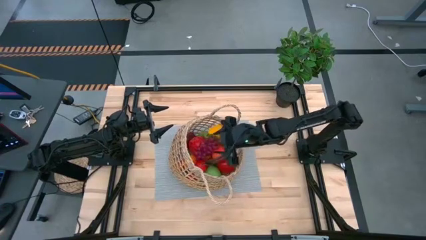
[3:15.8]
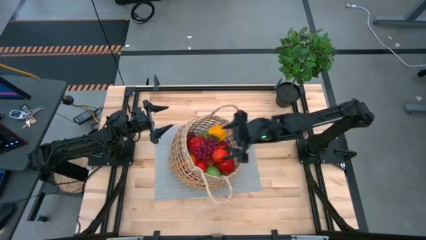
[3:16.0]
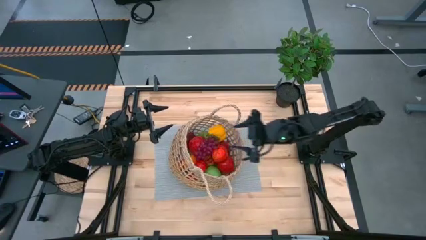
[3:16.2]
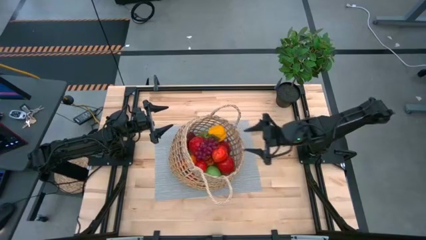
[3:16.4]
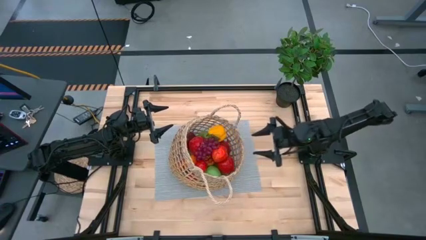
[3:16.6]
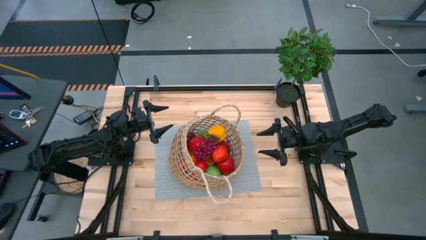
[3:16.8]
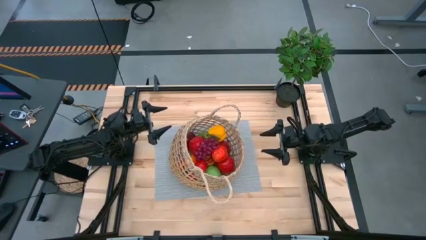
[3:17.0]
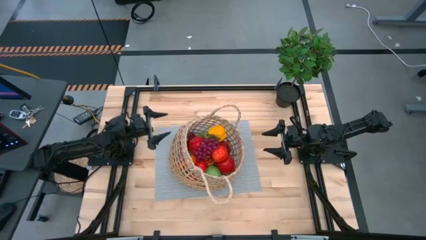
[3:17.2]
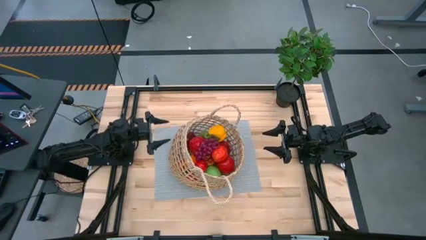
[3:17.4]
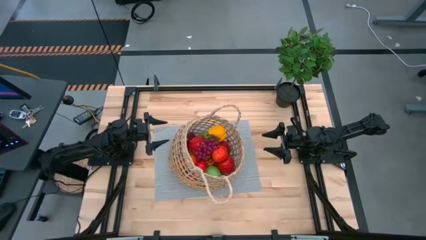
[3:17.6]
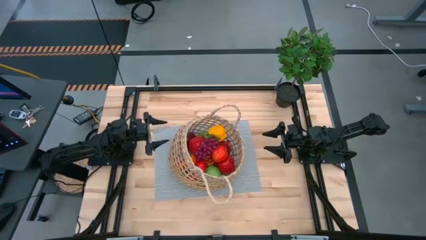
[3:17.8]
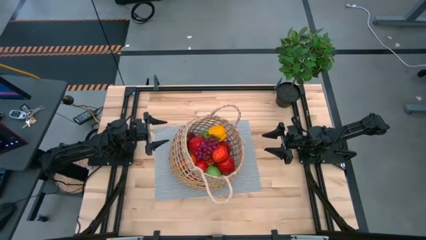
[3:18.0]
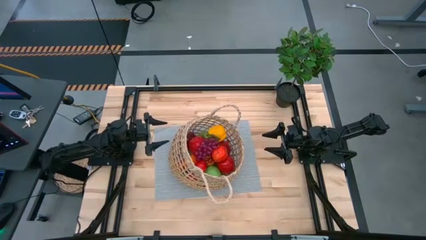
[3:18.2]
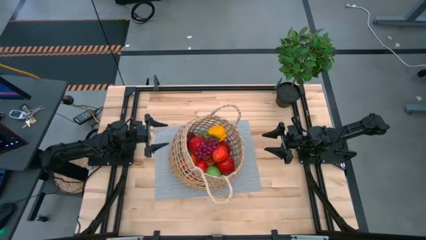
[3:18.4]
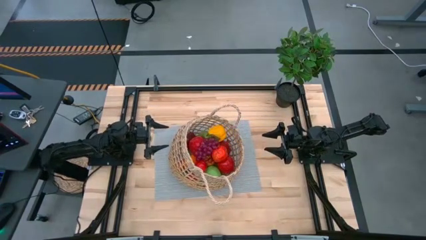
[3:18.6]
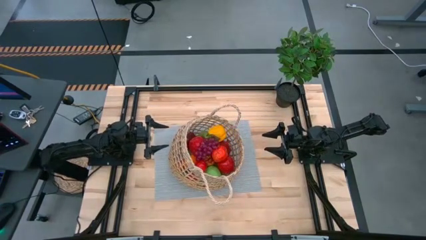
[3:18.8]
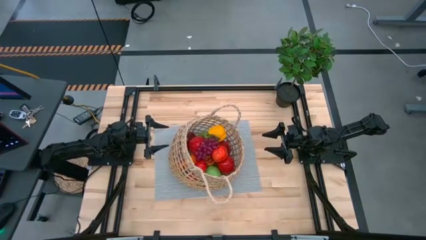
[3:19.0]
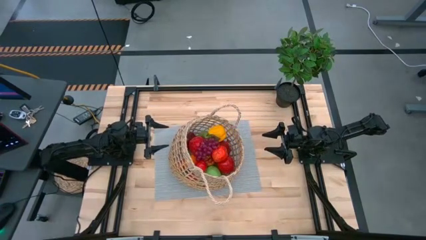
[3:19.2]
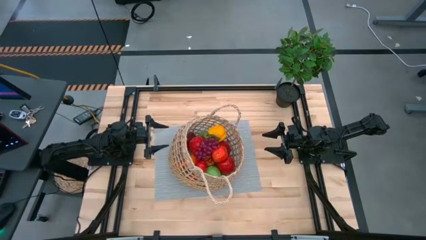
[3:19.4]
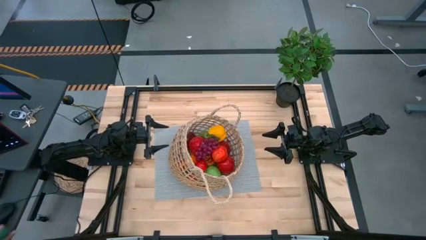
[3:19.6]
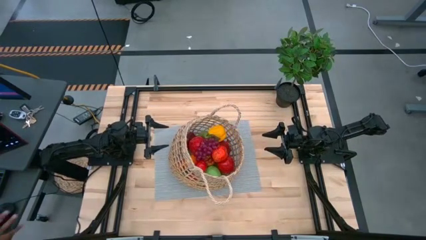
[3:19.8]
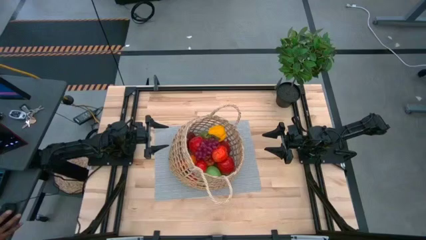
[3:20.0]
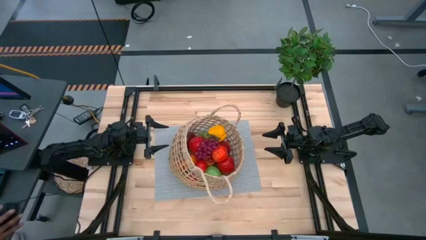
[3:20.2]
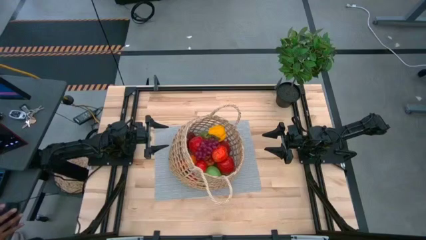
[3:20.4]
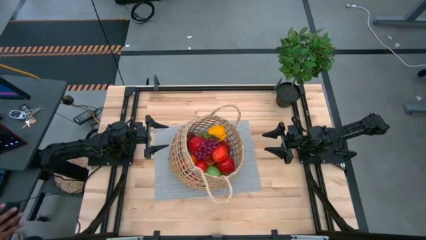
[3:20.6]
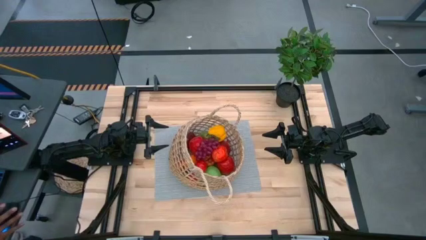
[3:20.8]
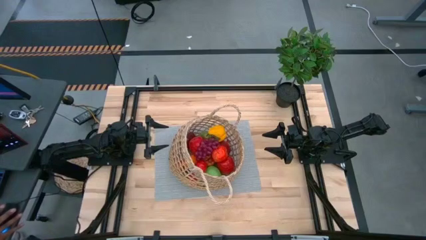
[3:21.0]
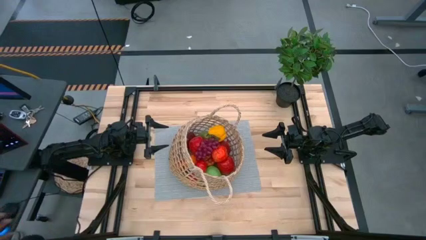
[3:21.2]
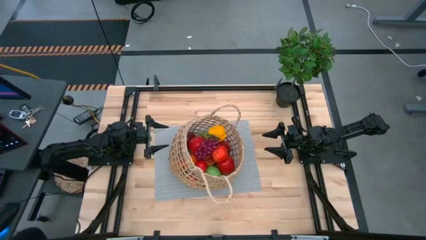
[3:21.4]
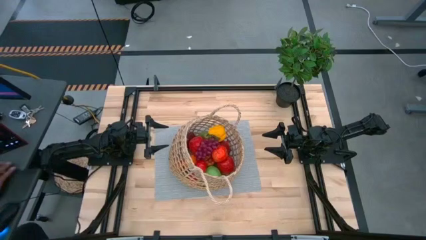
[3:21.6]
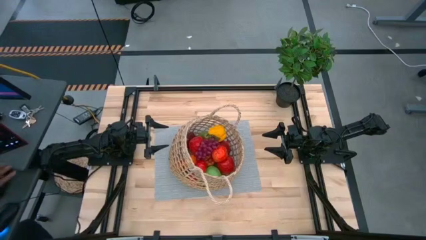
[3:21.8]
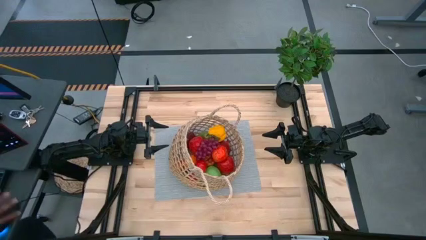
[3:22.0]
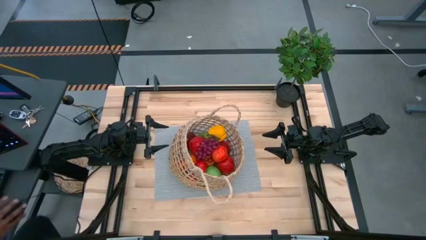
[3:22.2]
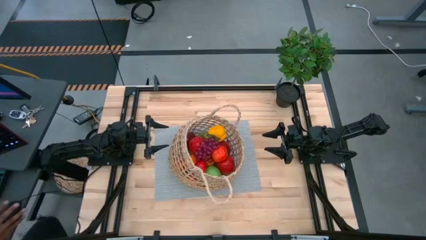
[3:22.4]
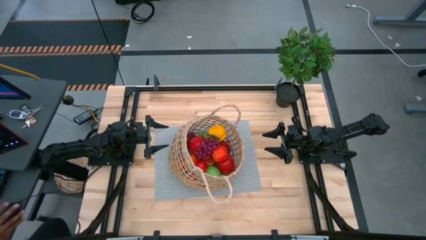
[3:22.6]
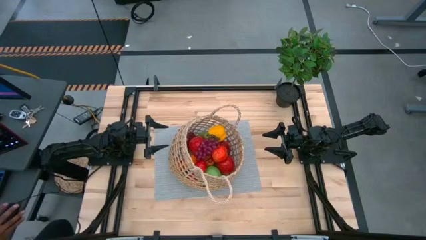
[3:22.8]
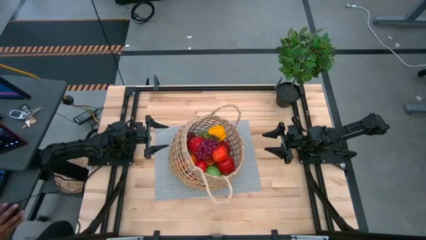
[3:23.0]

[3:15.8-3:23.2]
Task: Build produce basket
Return to Home Position

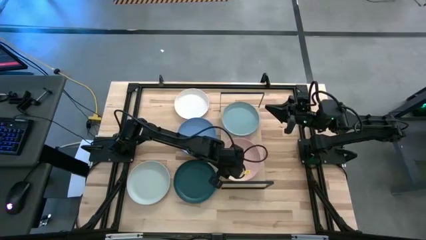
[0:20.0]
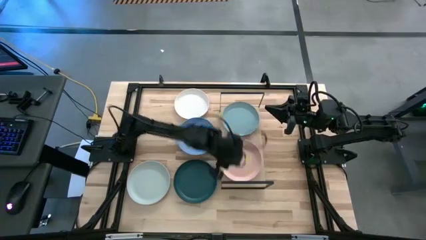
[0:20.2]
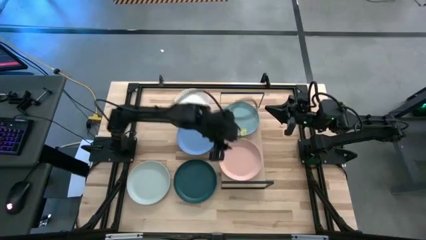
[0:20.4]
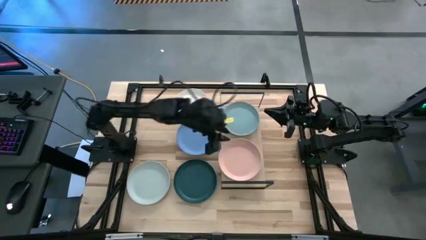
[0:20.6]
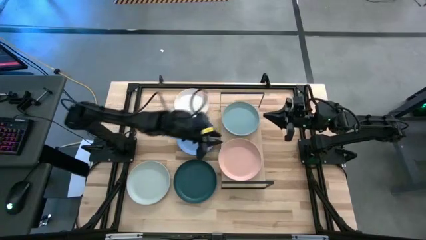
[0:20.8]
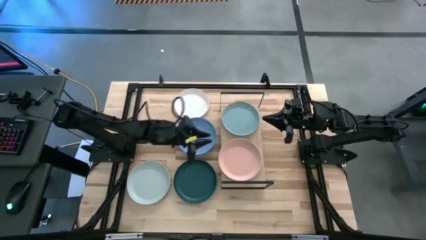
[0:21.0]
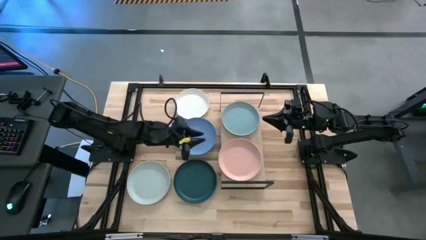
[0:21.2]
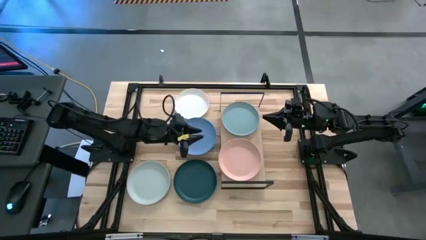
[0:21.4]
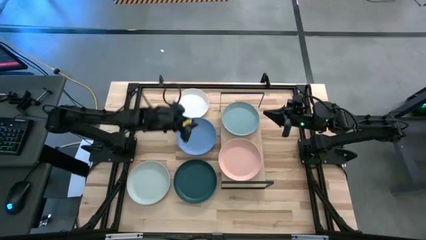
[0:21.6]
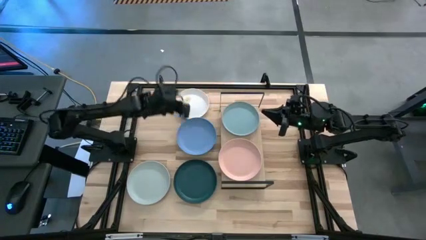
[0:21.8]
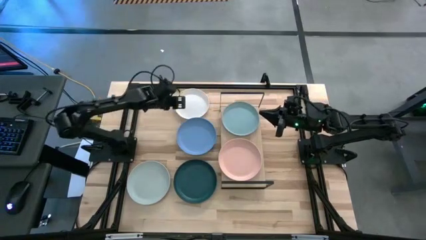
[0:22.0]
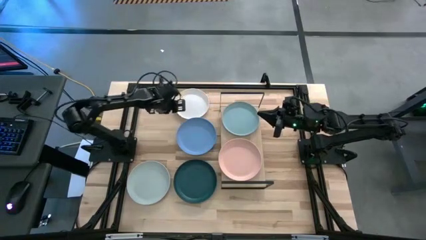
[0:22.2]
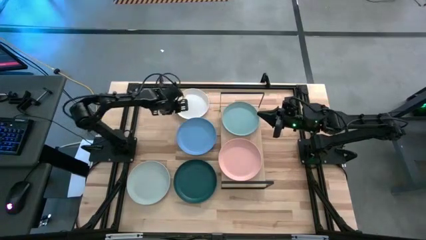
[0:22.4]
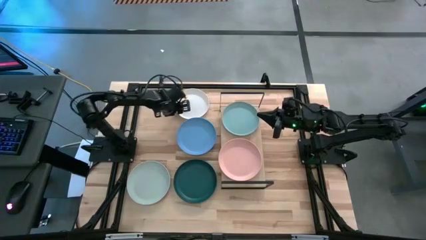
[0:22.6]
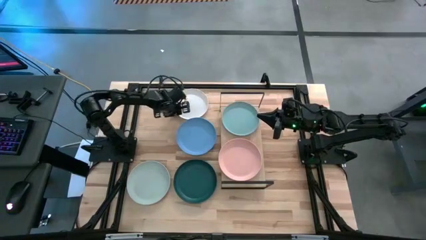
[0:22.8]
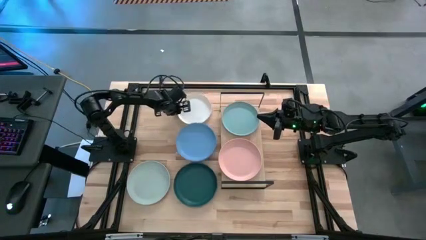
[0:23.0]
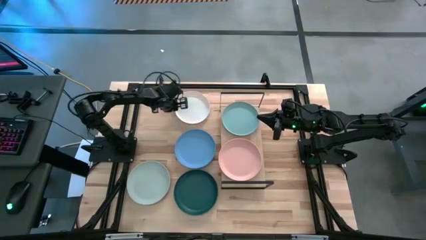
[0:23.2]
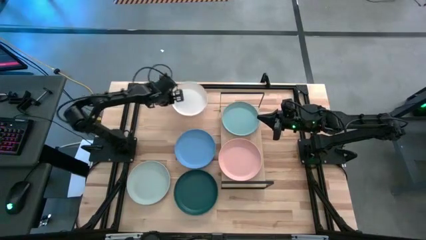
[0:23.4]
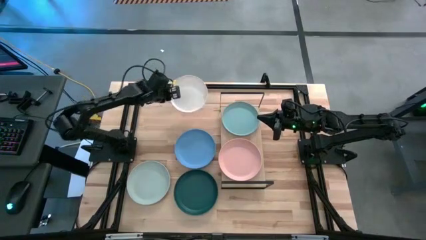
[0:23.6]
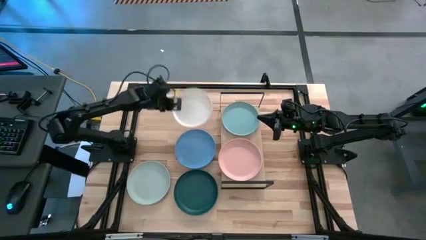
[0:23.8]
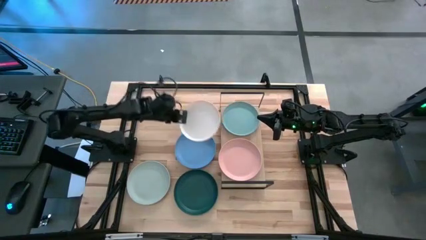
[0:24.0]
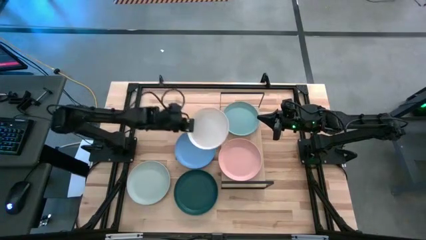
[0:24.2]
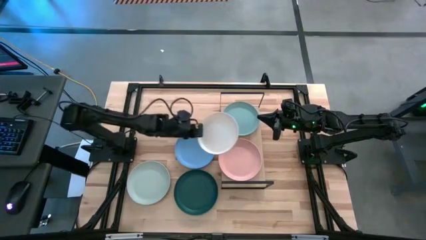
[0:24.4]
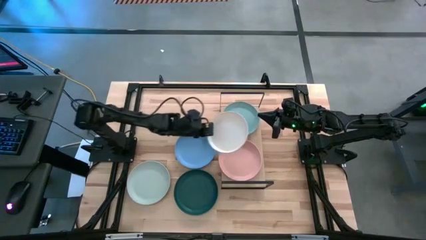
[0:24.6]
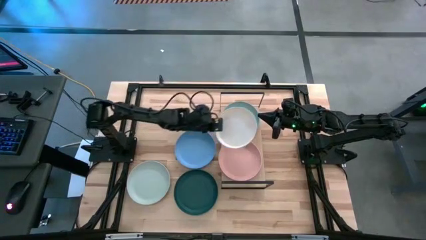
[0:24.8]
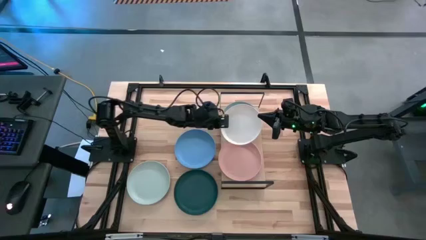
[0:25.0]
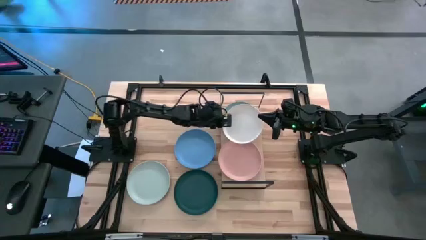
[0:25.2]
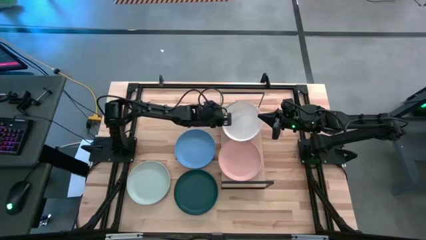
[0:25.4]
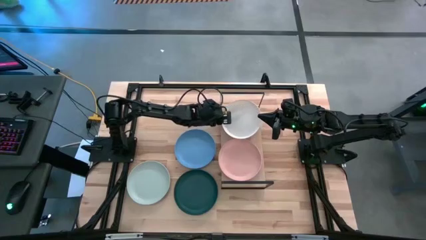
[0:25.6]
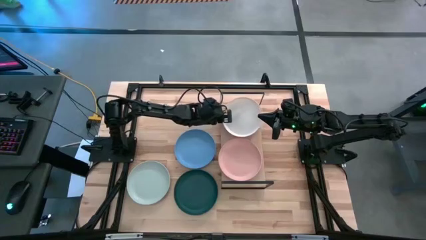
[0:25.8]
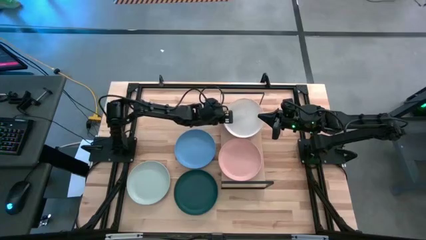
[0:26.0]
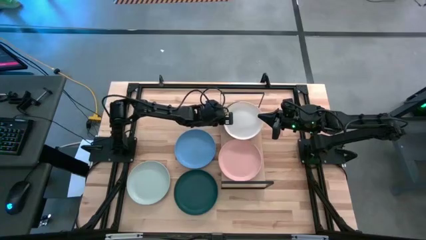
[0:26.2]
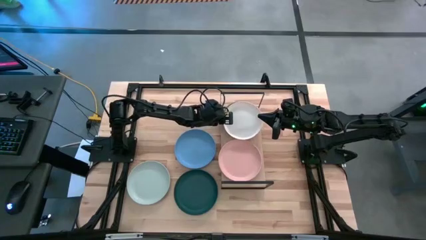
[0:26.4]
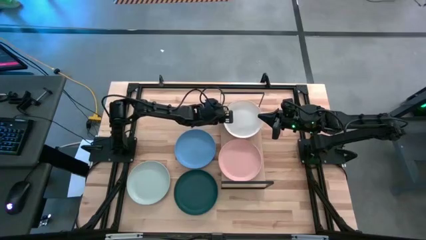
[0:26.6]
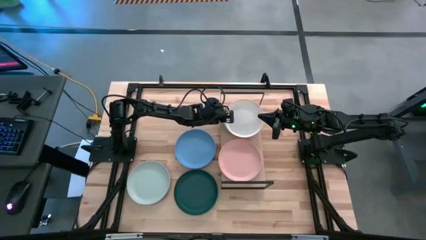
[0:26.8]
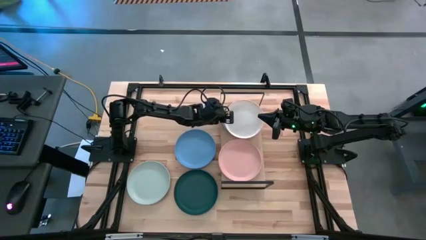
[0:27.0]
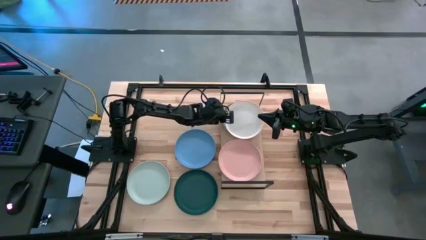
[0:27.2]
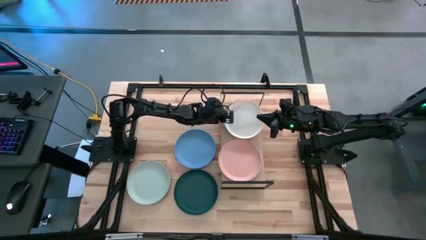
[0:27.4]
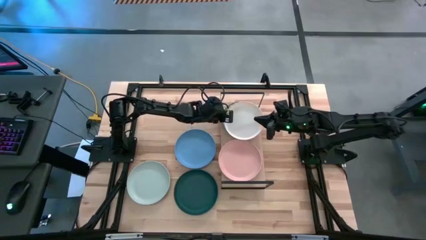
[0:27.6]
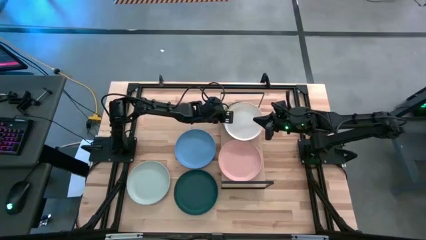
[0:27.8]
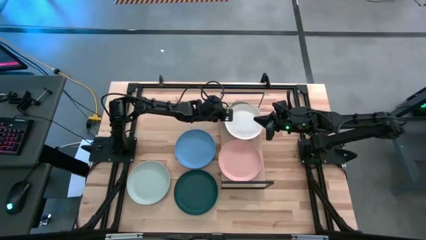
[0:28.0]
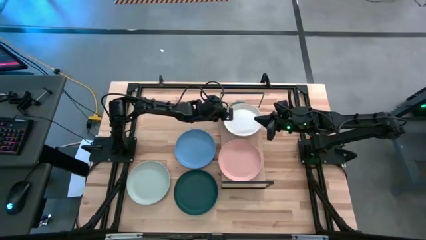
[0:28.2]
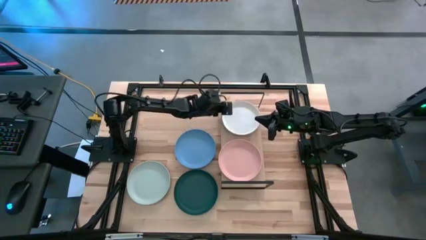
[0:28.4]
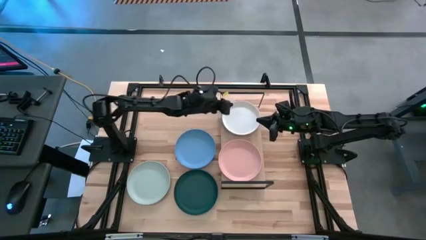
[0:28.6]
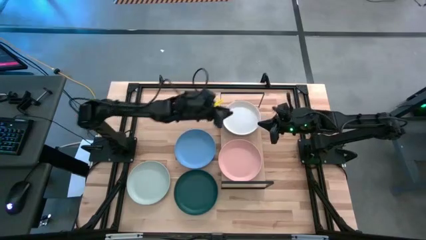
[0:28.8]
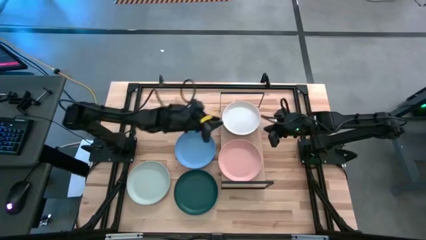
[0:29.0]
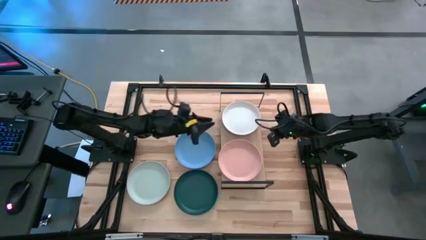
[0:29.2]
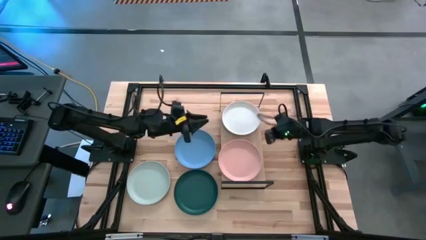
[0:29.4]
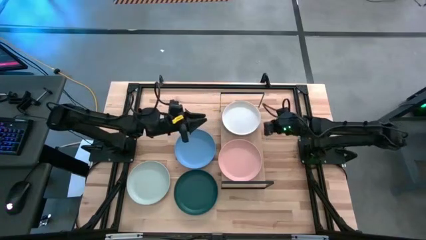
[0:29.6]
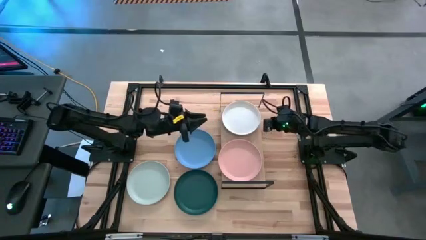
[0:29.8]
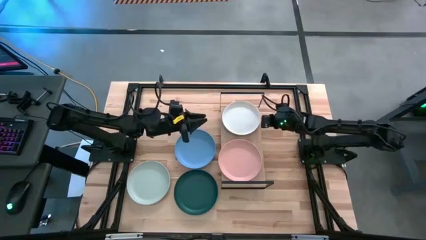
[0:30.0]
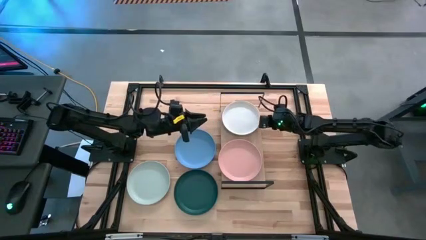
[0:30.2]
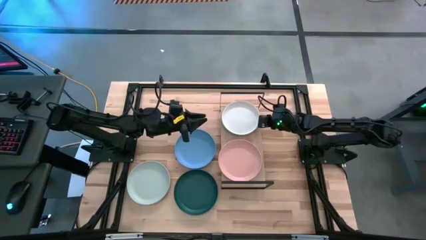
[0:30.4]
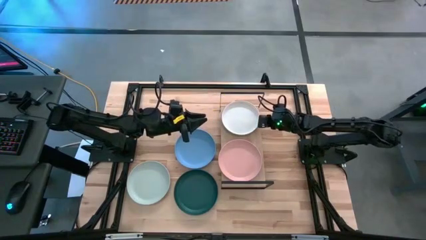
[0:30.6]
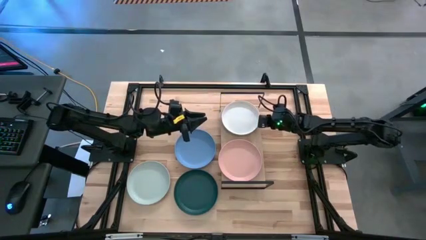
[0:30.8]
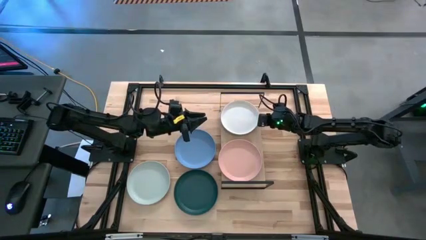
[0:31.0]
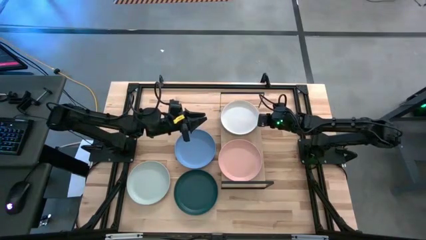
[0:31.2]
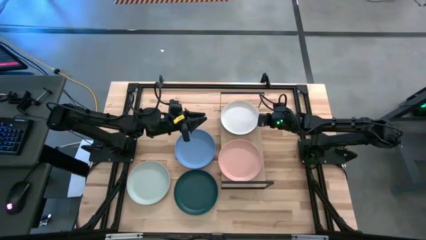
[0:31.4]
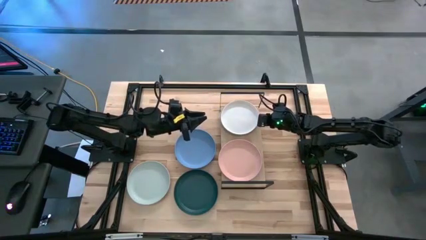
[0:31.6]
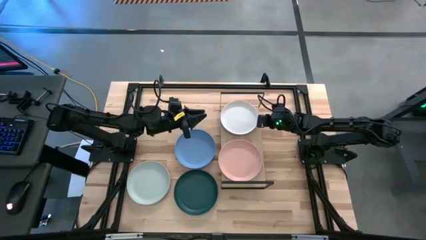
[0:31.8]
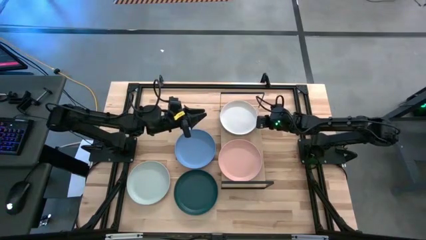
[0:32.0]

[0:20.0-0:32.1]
Task: Place and stack plates onto a shelf
Stack the white plate on top of the light blue plate on the shelf
